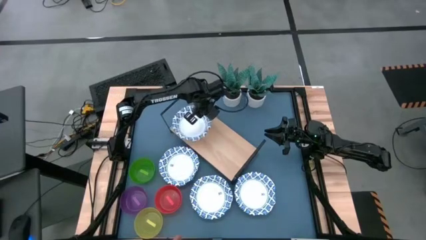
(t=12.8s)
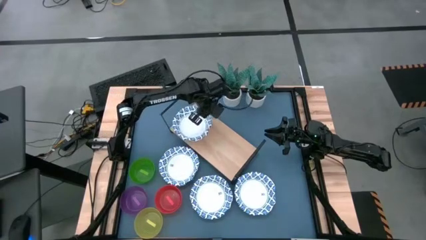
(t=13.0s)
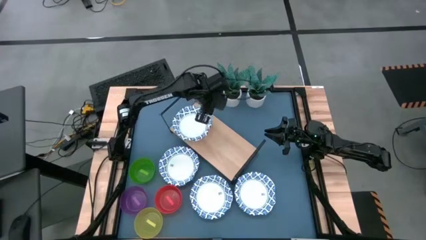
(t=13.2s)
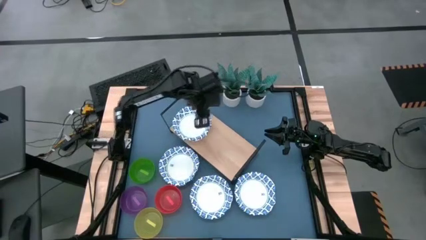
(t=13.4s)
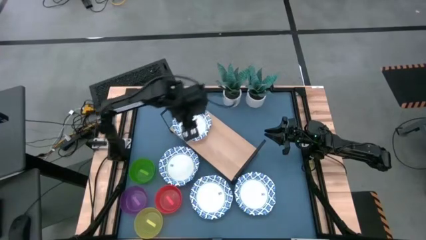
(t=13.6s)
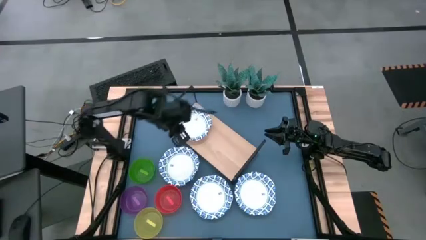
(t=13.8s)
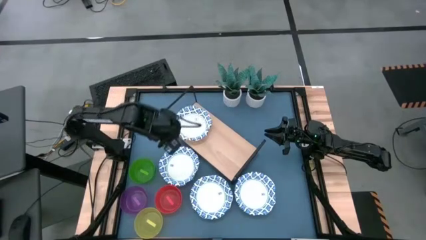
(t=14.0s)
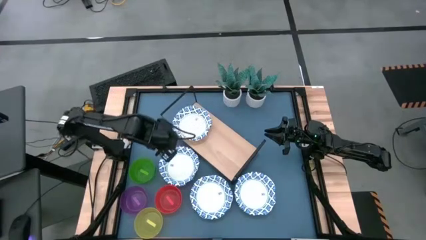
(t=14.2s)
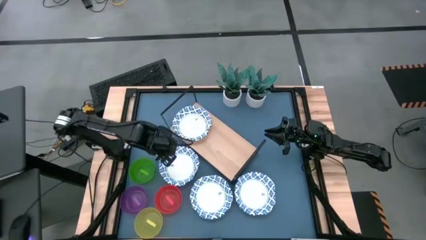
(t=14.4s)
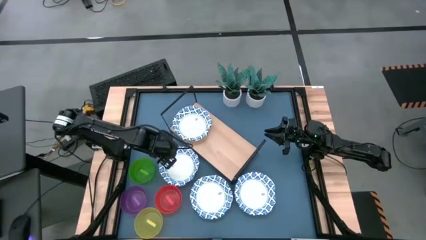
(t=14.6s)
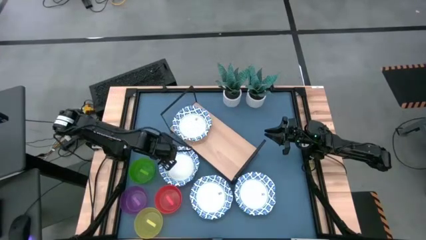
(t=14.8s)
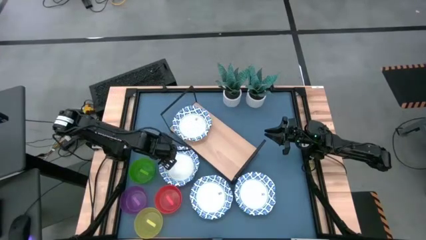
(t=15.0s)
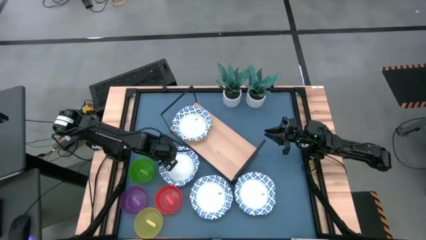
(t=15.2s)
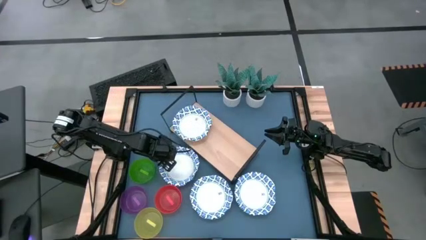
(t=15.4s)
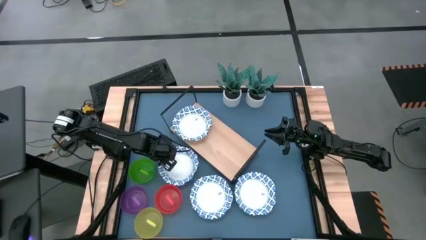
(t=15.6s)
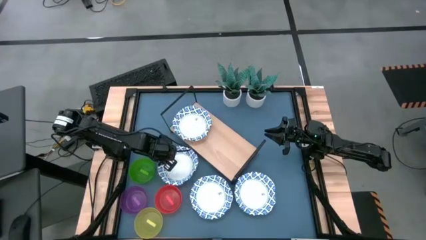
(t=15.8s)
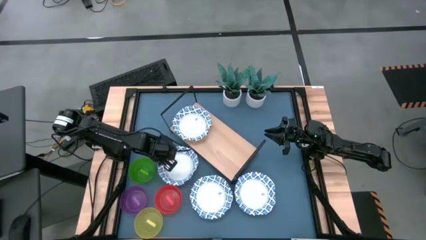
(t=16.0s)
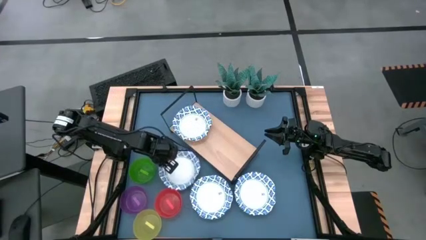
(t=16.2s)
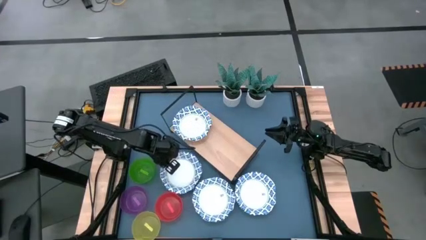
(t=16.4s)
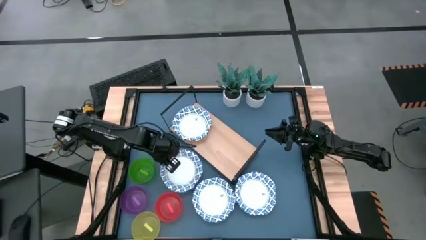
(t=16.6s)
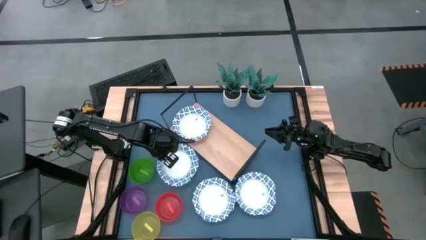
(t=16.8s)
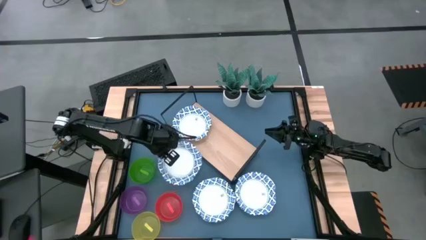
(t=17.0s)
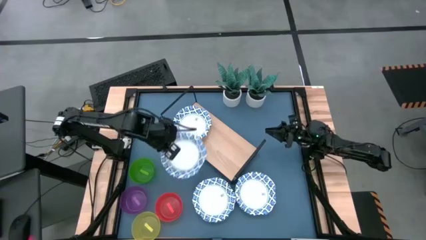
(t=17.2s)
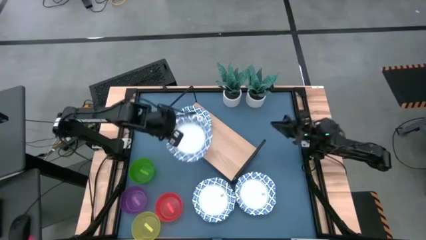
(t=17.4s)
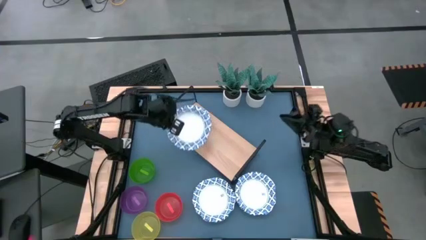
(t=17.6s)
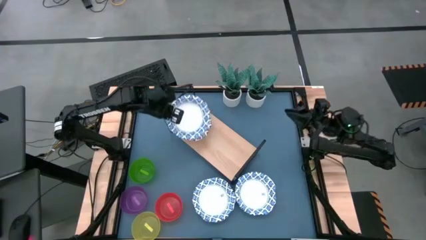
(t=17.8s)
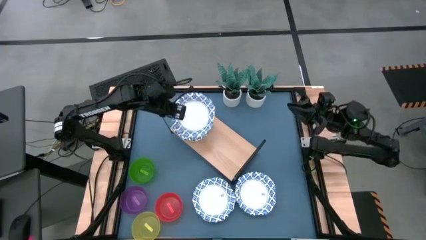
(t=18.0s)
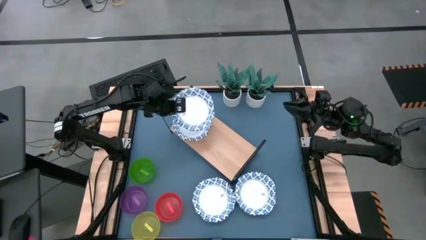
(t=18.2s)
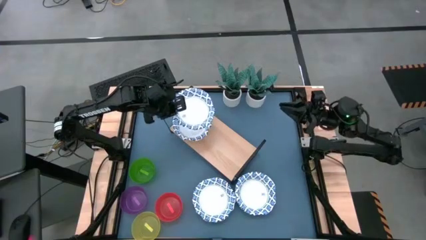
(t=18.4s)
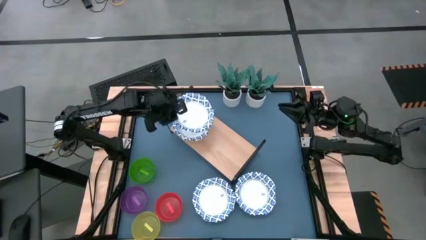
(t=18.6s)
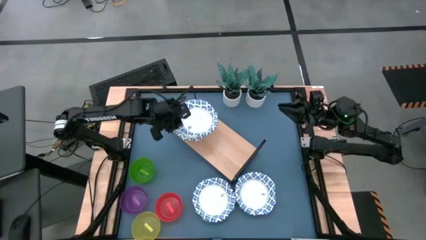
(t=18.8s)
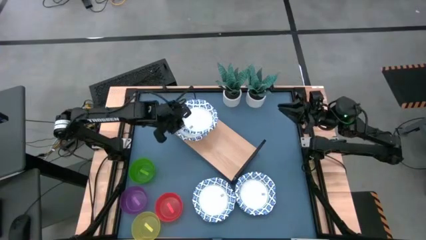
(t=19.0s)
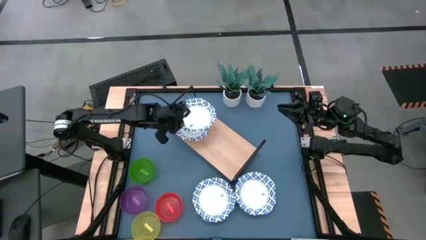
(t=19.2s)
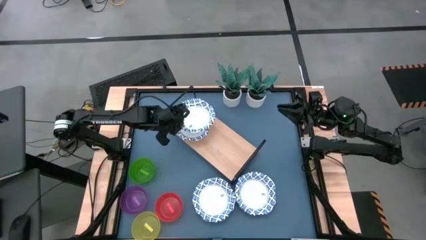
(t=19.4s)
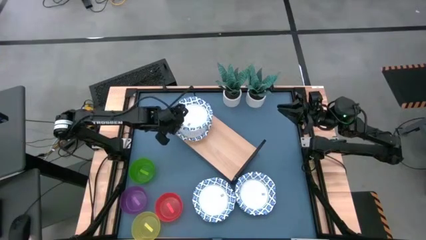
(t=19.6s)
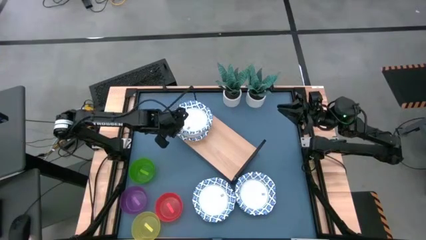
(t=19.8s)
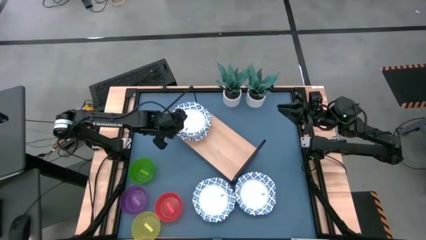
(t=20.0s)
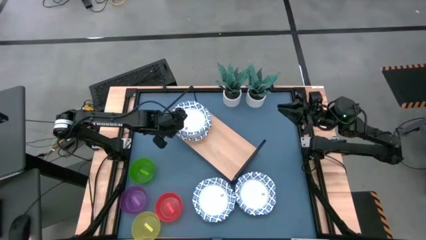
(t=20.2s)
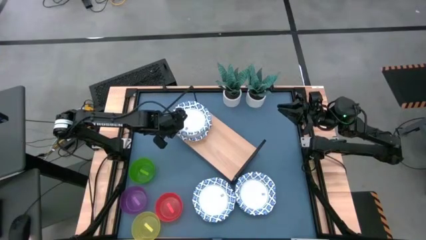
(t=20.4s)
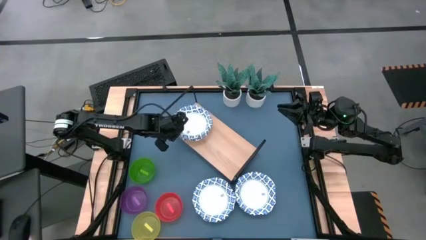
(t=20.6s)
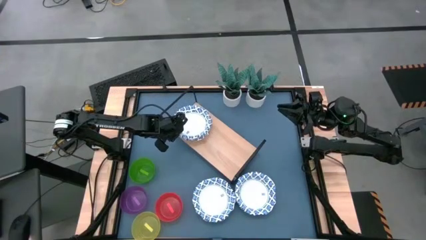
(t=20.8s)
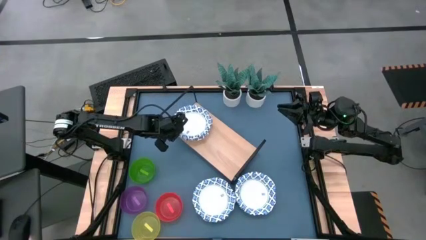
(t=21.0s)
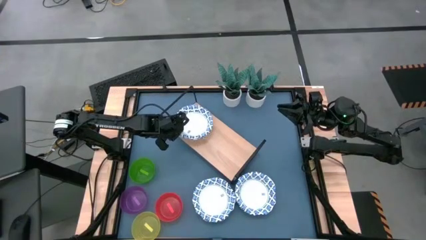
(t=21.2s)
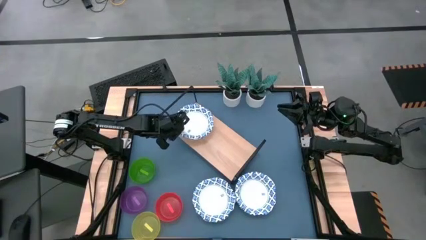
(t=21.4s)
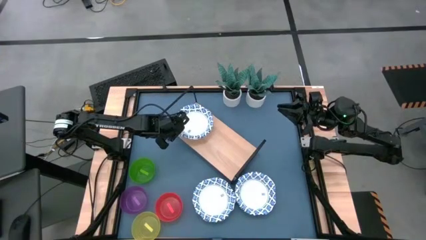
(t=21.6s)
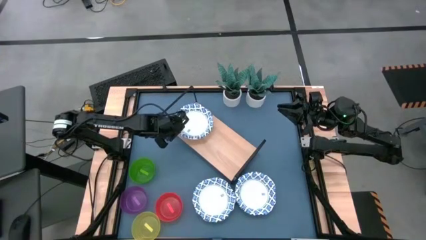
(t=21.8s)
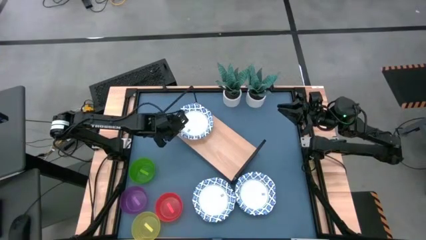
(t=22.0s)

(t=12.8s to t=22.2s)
Task: Place and stack bowls onto a shelf
Stack the left blue bowl on top of the blue bowl on the shelf

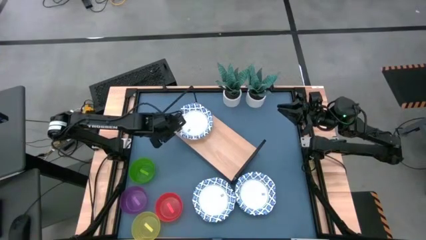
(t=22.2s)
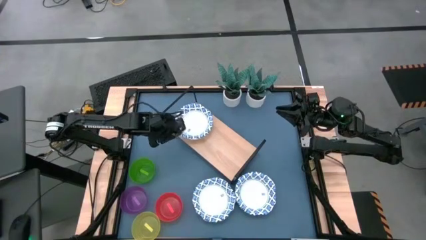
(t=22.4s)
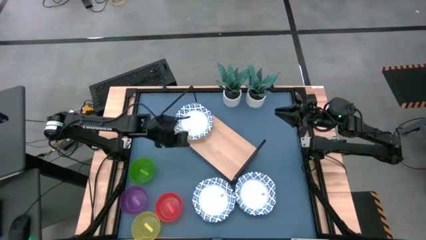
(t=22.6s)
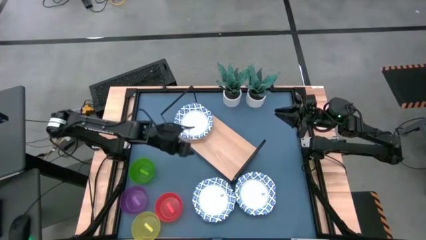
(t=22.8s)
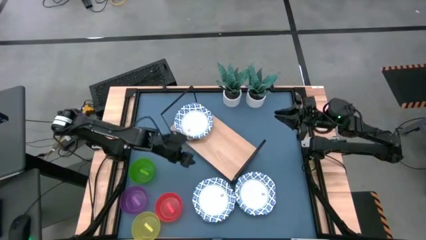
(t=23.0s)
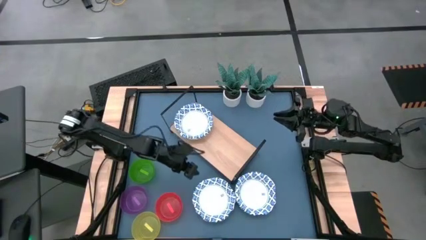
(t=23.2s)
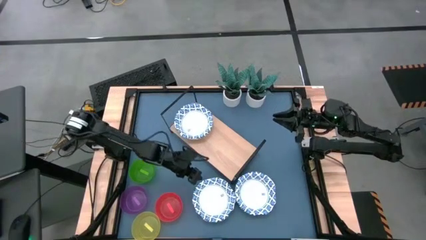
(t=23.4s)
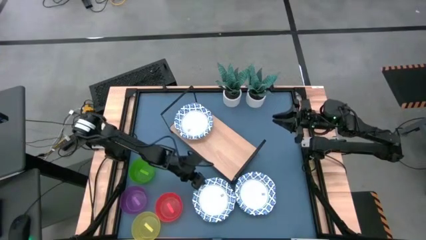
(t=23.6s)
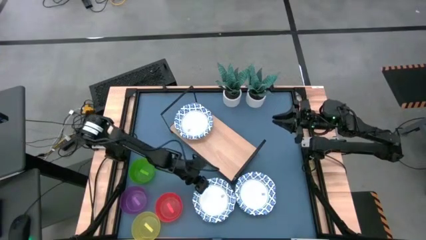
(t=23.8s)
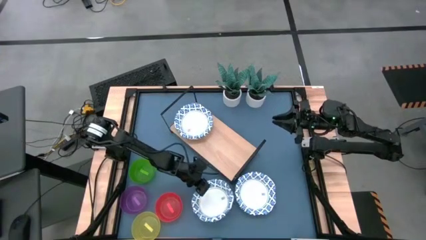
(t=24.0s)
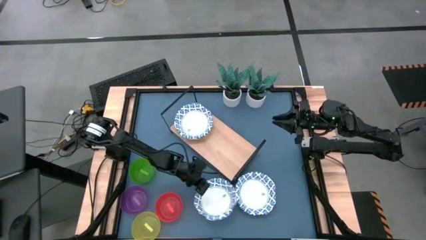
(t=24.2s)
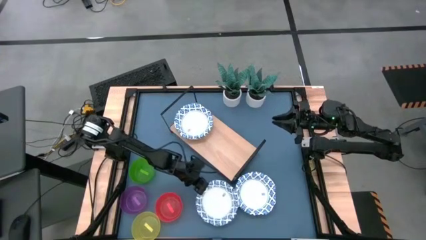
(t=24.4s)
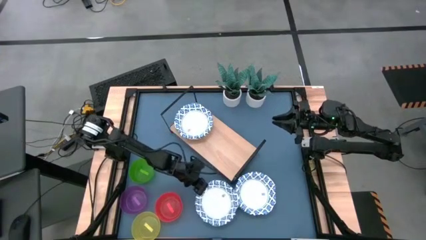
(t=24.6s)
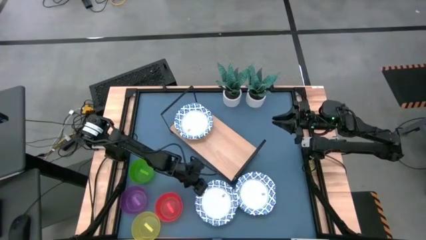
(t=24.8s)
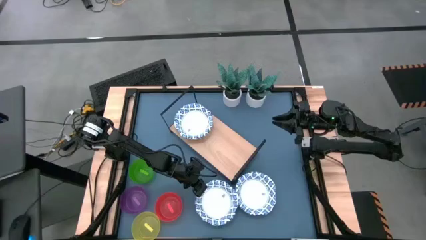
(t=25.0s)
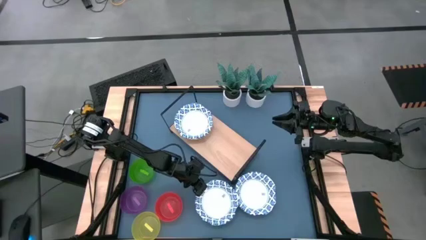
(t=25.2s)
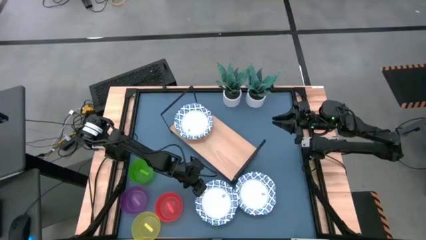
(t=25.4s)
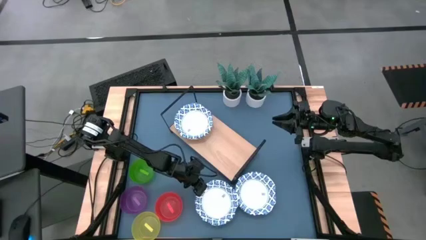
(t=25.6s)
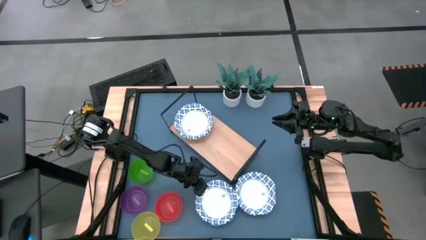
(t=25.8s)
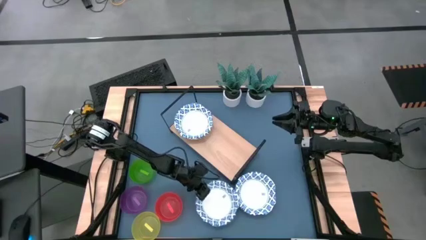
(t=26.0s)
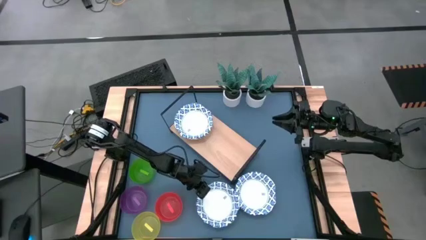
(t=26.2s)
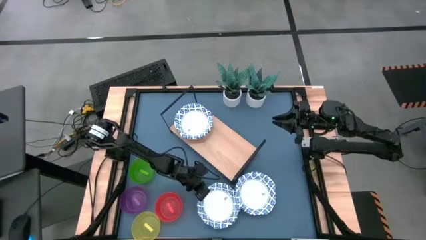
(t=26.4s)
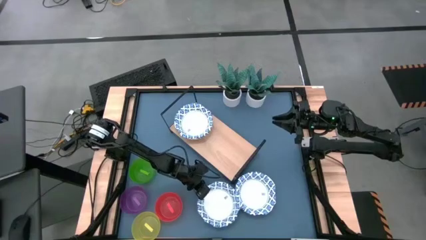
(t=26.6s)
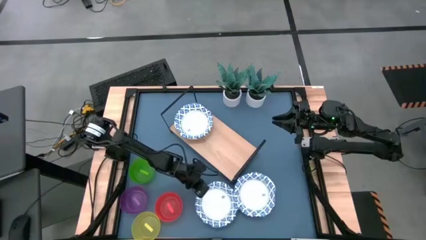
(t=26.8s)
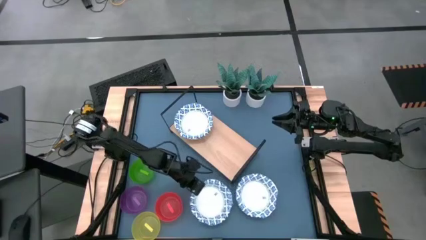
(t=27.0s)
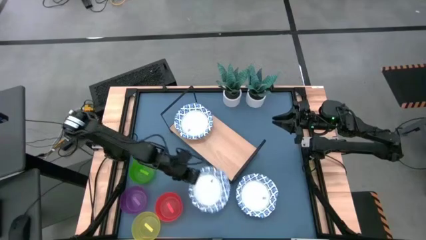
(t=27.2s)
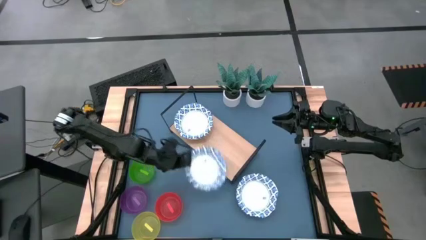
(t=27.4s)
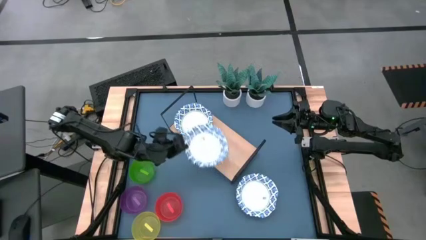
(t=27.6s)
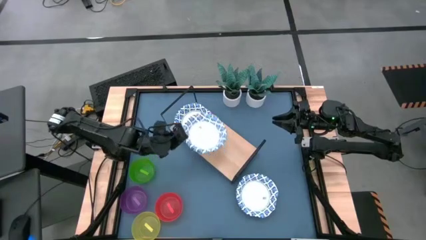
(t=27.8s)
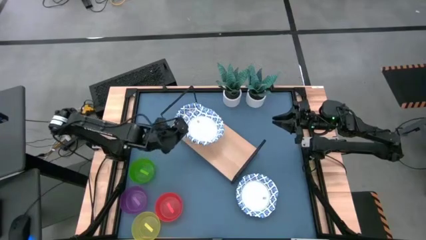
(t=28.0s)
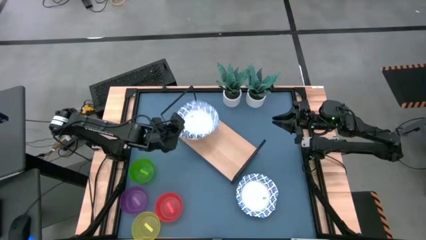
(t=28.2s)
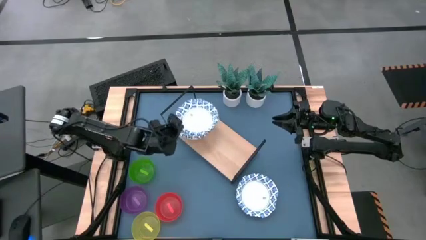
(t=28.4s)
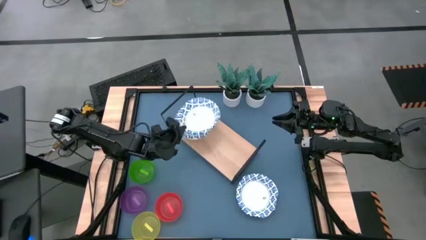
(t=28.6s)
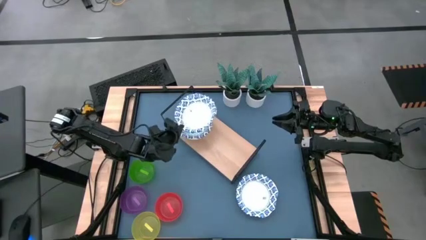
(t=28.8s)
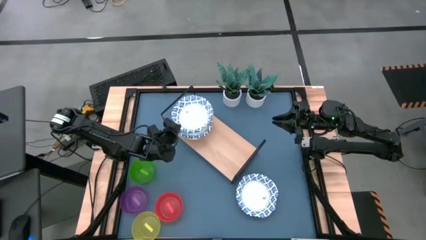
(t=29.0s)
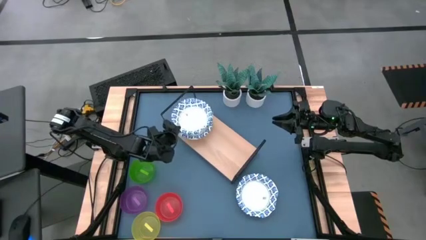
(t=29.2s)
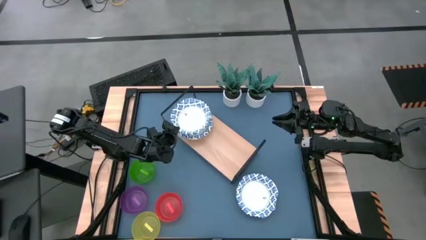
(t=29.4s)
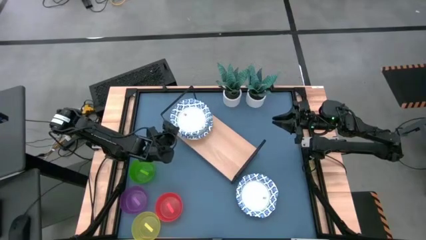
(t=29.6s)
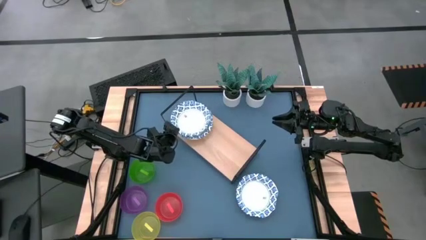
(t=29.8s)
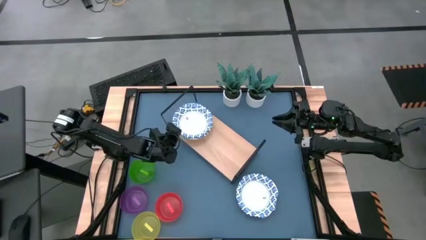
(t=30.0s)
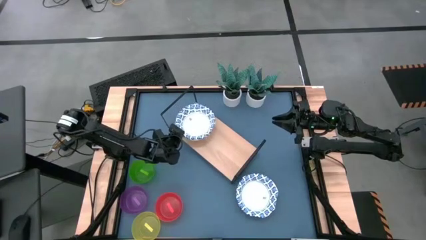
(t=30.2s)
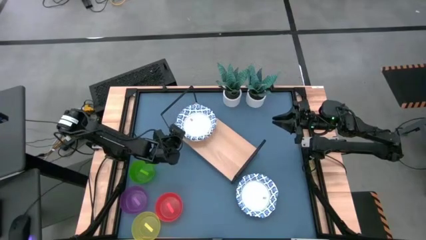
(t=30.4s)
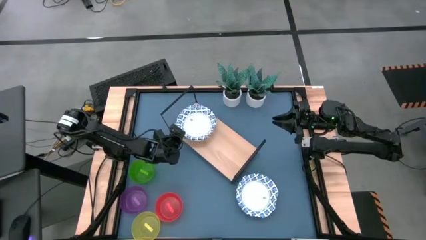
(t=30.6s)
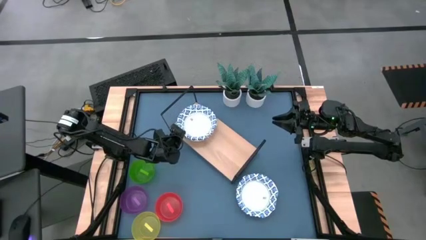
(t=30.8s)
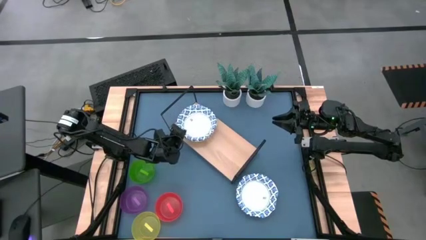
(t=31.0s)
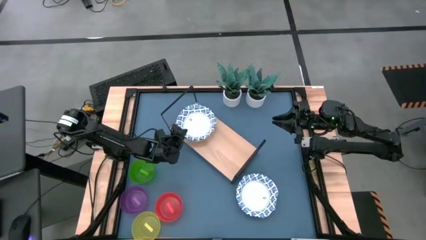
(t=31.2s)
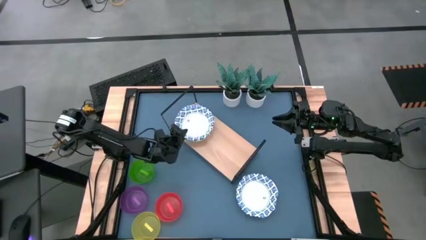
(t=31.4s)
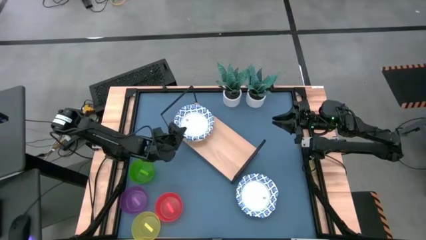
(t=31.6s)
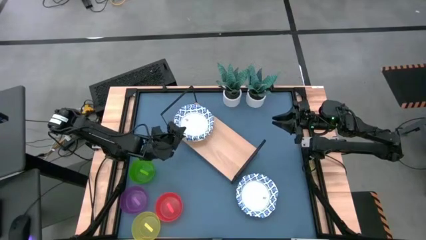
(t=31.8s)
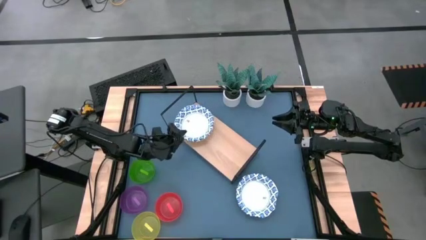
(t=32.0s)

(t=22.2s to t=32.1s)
Stack the left blue bowl on top of the blue bowl on the shelf
